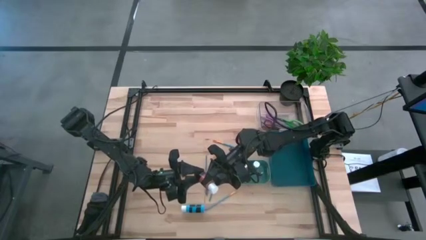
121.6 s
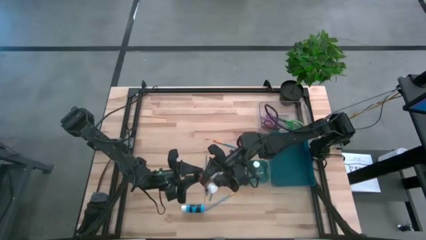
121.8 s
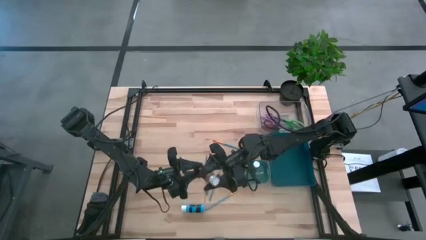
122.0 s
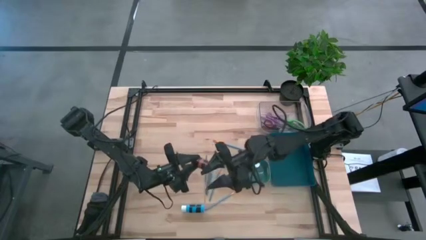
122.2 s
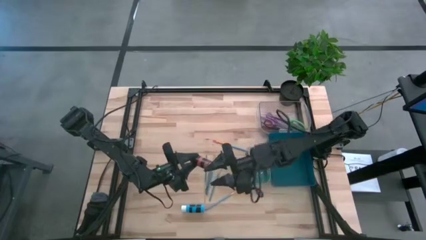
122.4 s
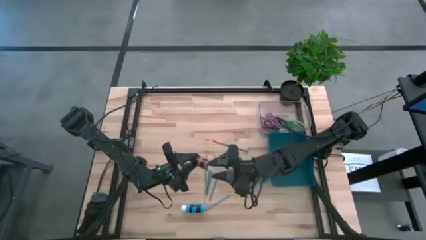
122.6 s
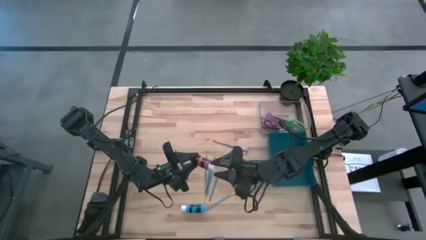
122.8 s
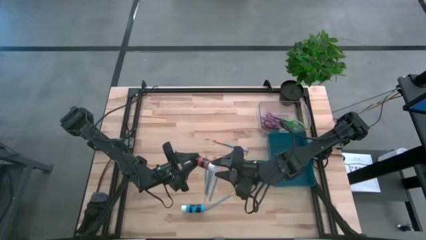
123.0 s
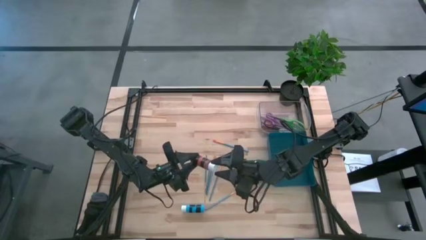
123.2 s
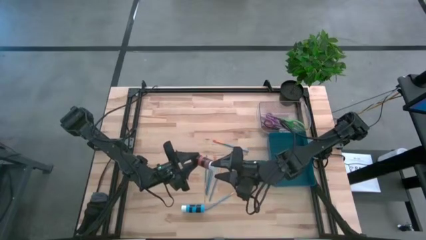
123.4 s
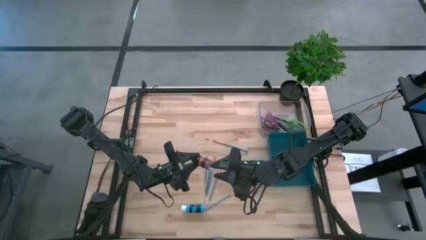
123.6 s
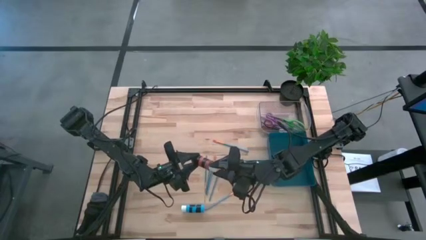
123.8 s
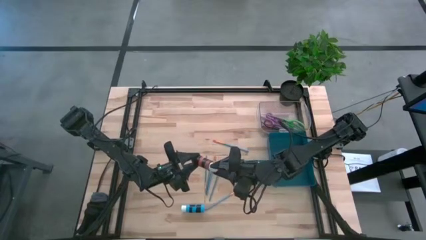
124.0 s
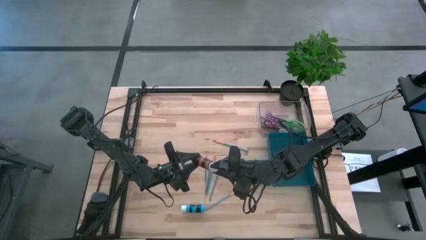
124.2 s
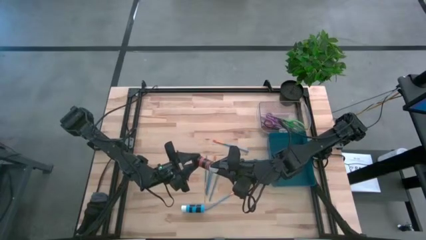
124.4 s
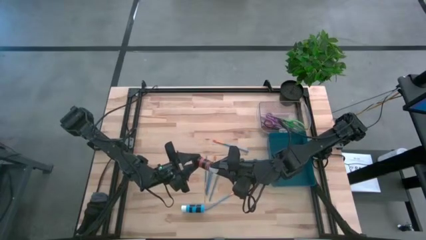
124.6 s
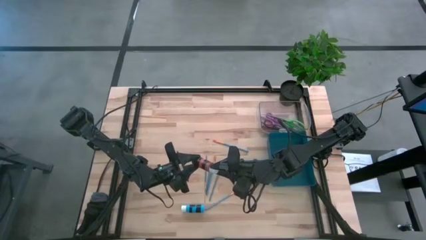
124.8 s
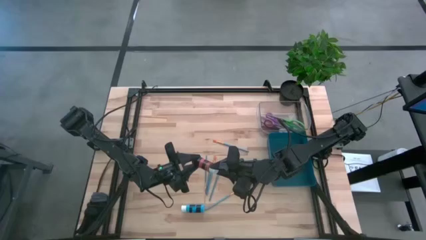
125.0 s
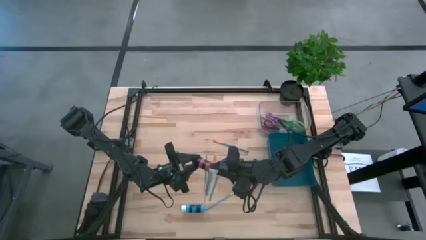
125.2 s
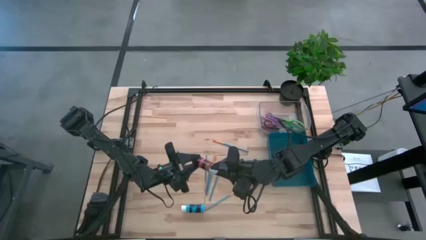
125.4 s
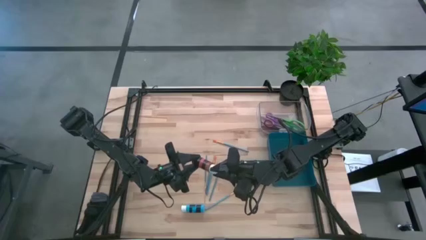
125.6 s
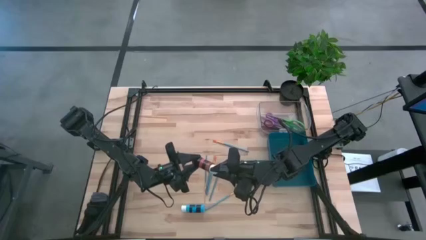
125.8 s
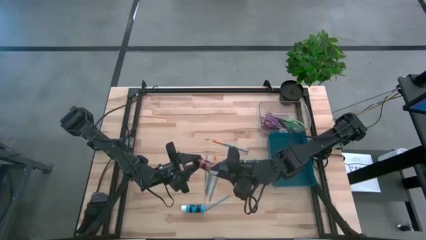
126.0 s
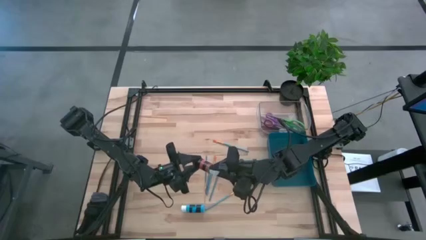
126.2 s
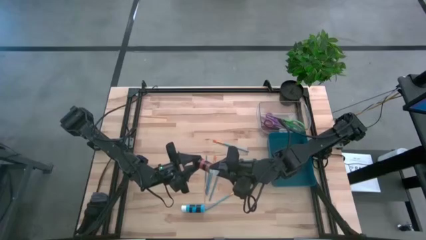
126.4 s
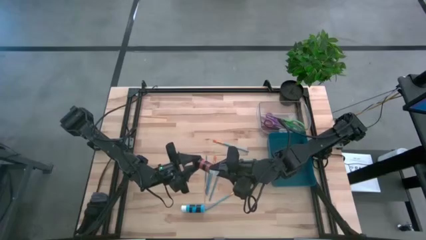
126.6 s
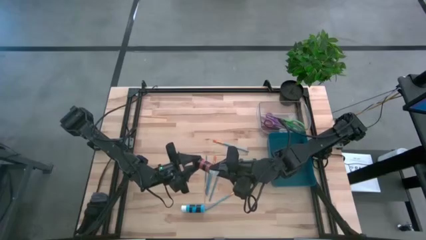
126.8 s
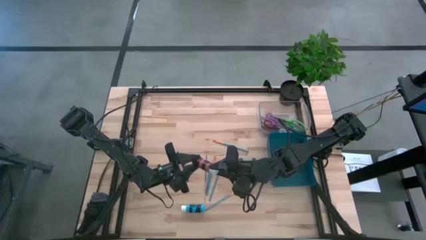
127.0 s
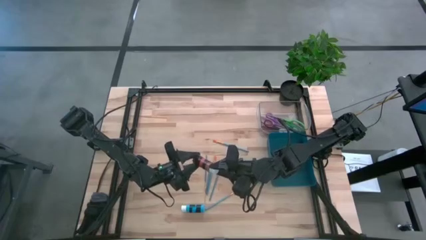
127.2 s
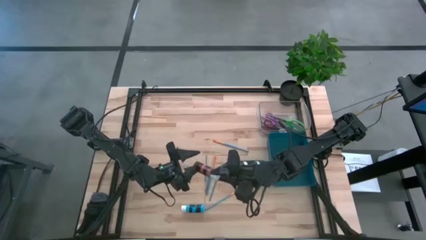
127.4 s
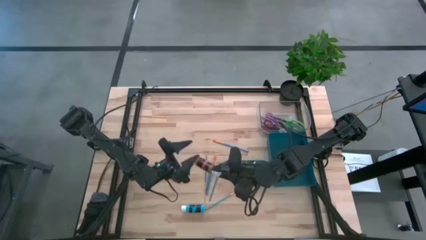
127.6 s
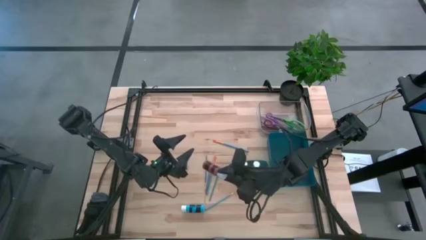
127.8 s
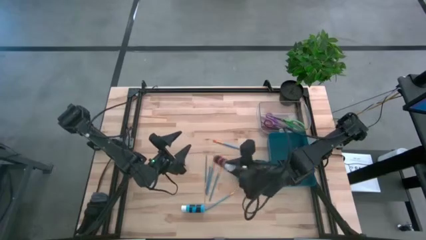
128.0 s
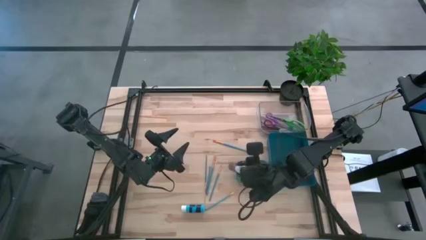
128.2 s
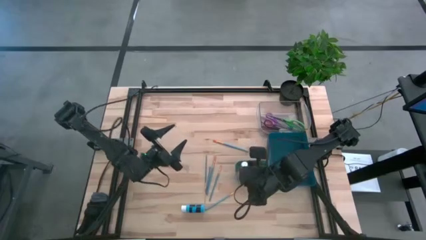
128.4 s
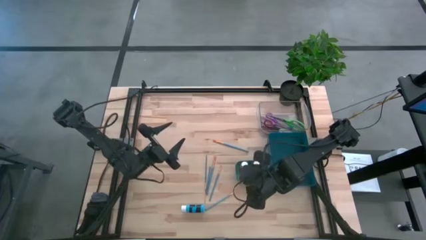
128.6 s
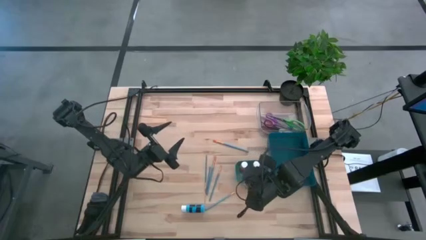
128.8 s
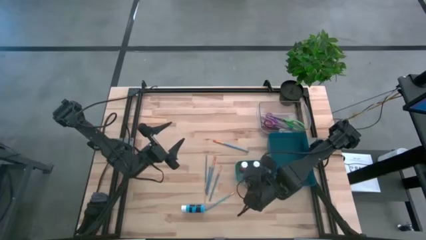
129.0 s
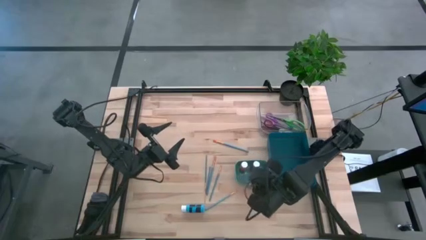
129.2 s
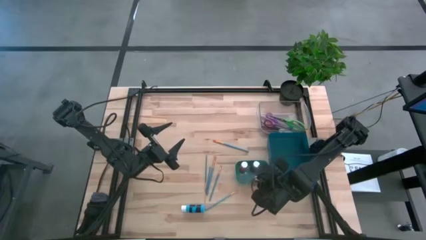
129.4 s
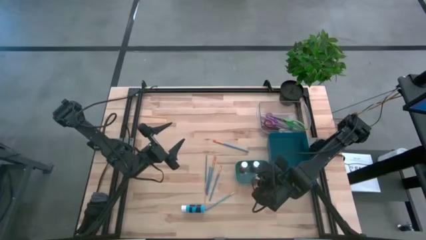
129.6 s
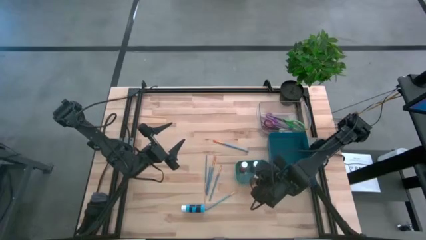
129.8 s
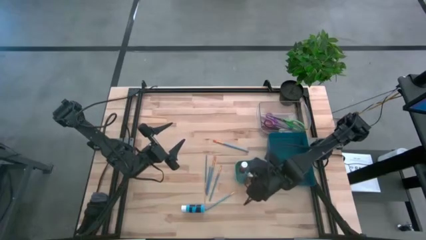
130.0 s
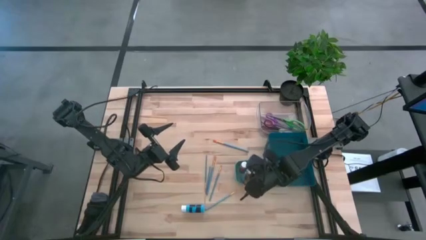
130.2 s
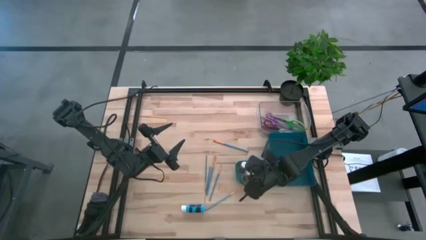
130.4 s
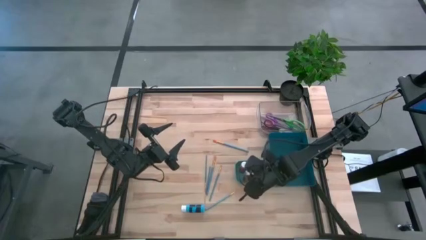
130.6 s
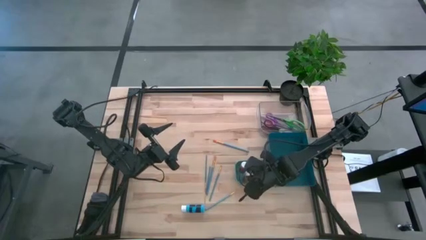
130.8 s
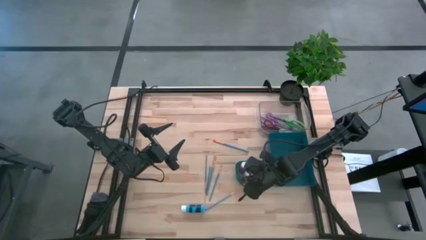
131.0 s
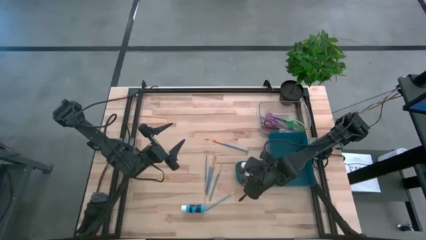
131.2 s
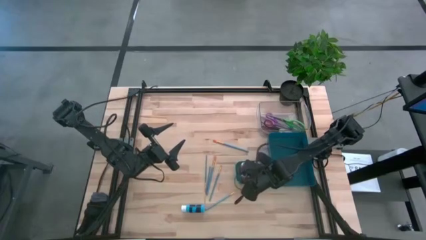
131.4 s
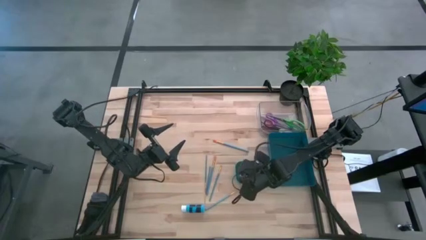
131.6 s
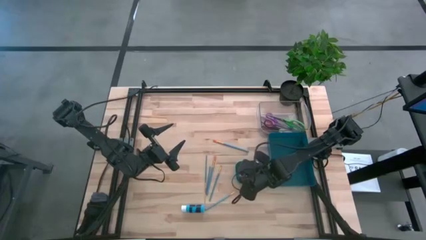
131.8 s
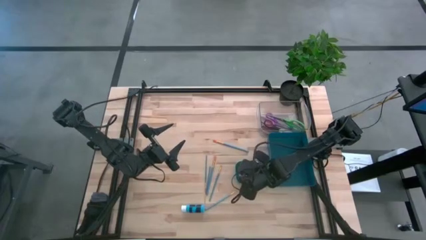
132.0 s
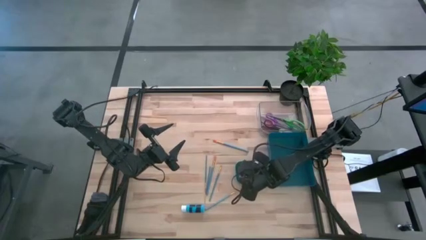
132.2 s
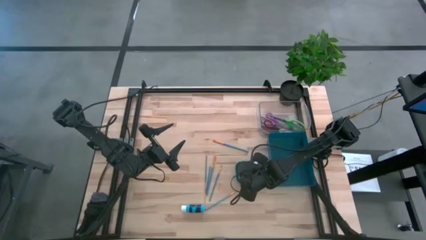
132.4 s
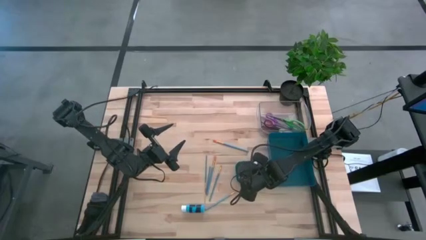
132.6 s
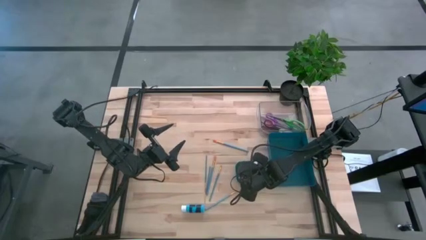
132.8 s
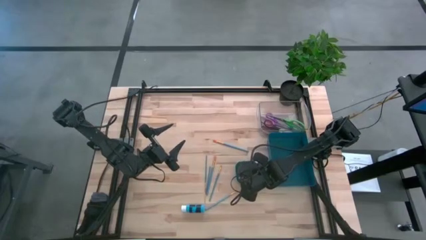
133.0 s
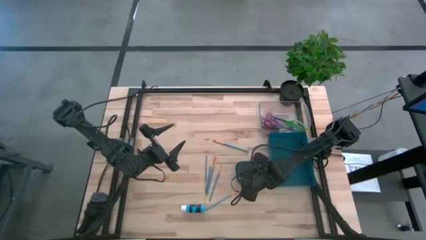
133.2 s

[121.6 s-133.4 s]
Task: Pick & Place Paint Supplies
Put the brown paint bottle into the green bin

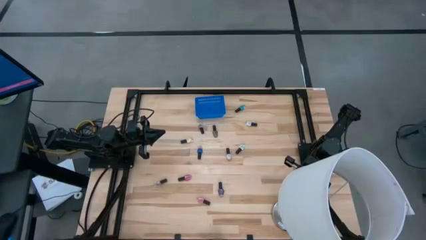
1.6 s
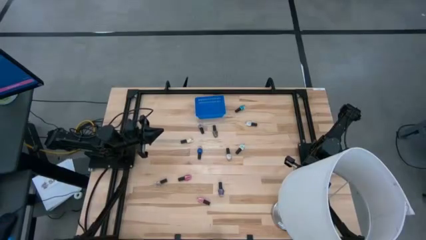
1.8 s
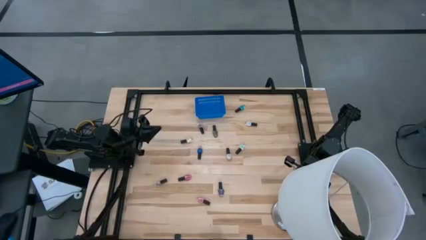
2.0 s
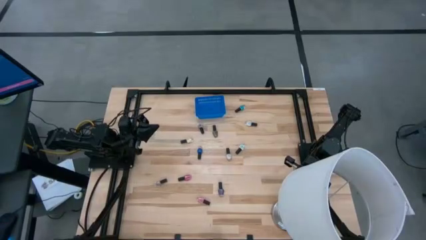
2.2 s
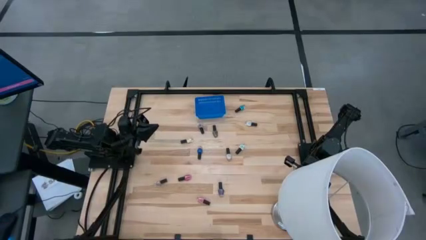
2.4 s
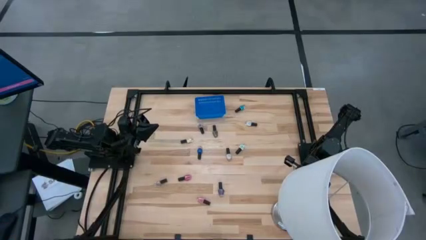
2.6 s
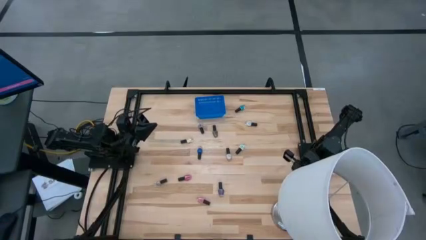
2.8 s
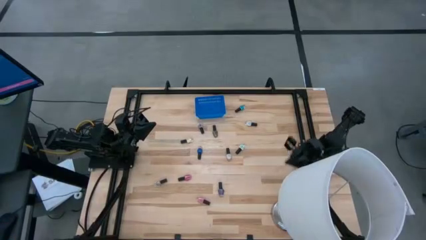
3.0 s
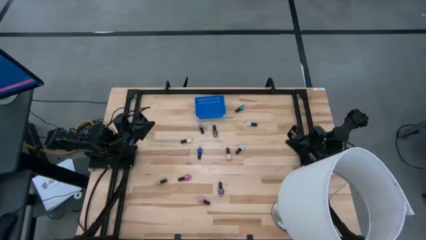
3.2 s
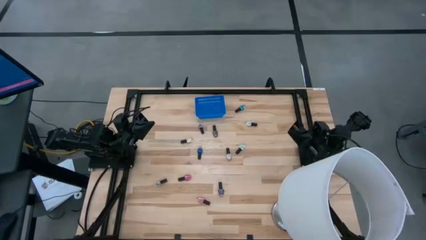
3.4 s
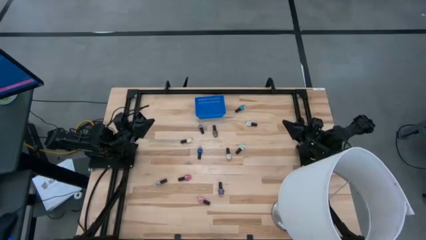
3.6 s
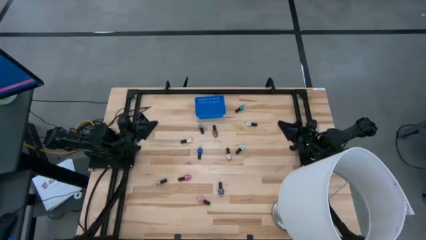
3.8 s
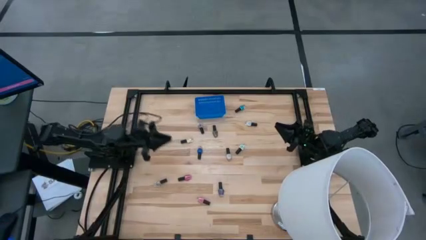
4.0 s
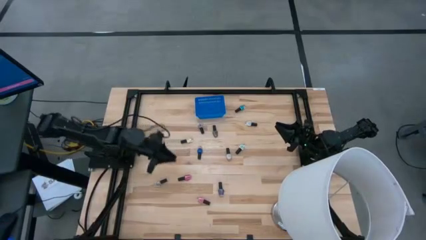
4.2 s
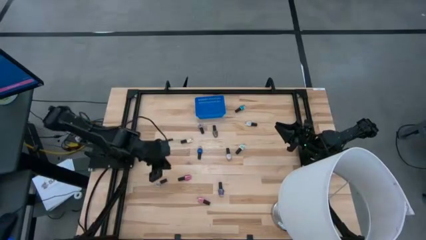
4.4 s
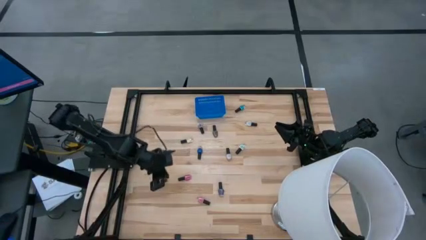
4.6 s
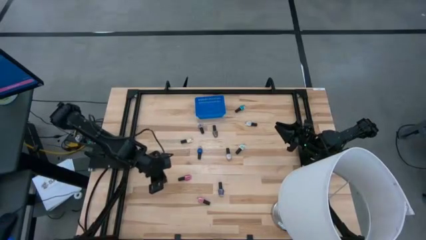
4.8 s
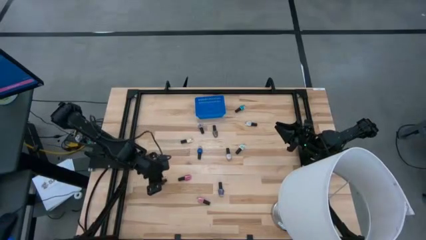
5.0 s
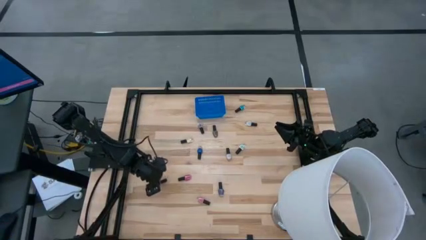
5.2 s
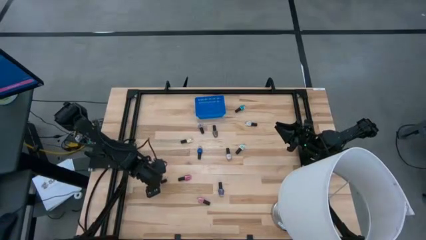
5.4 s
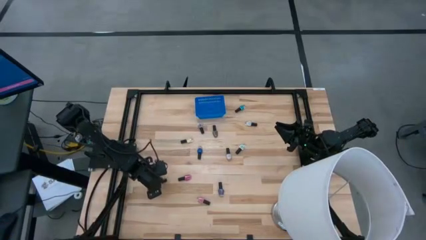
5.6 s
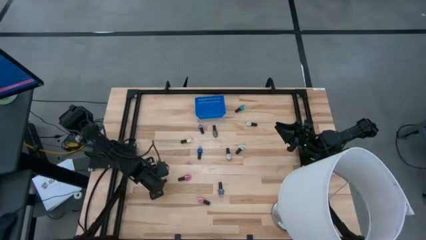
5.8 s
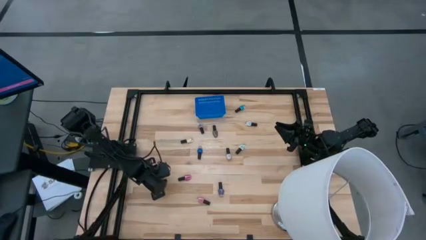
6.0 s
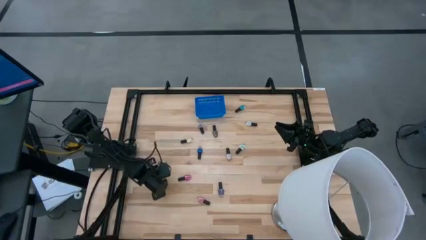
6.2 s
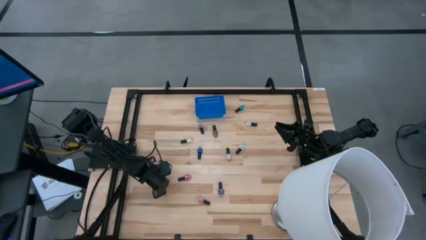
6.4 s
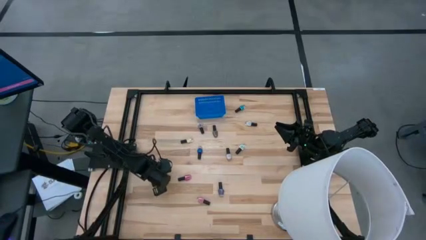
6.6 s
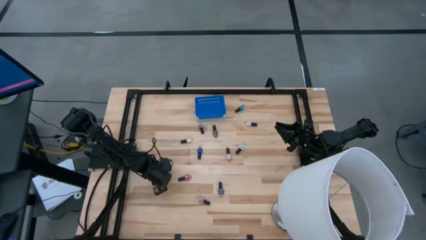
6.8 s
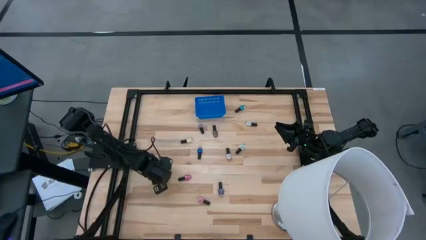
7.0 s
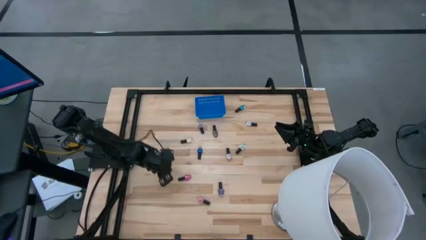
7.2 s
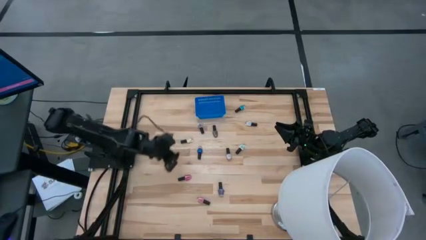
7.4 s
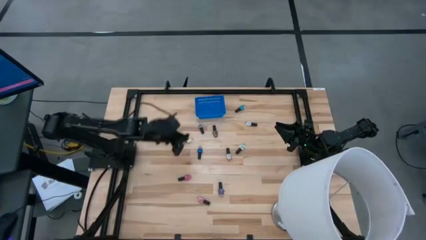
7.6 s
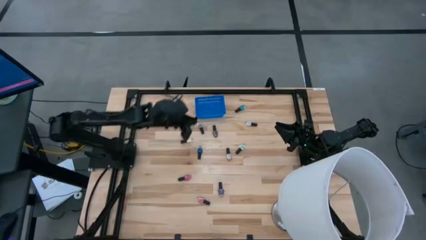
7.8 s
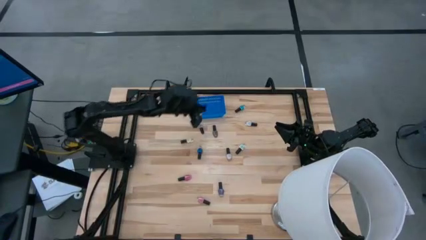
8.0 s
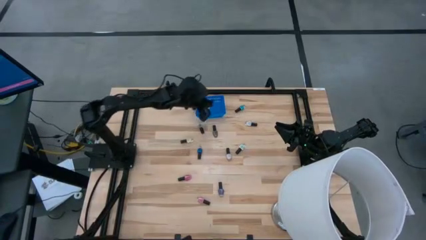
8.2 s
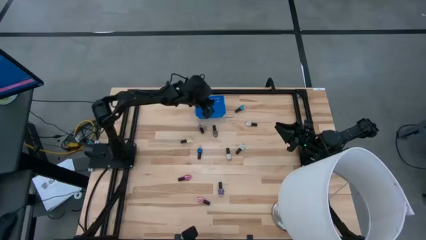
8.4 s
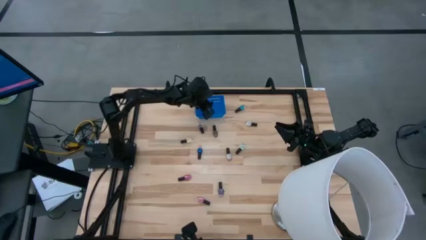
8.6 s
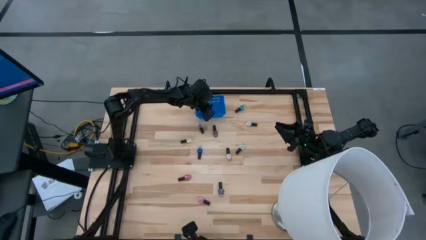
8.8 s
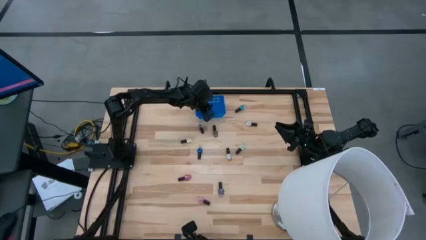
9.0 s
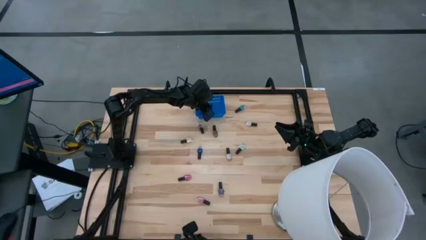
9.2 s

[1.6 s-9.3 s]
Task: Pick & Place Nail Polish
Put the bottom transparent nail polish bottle into the blue basket
